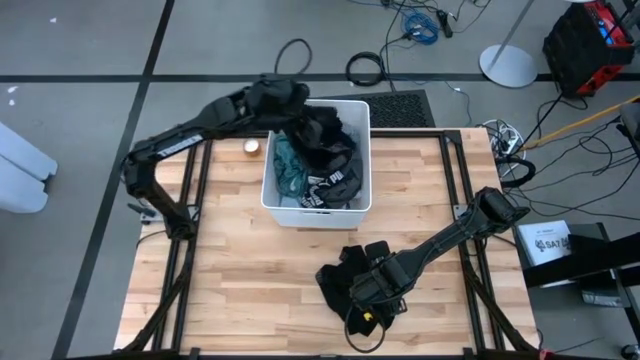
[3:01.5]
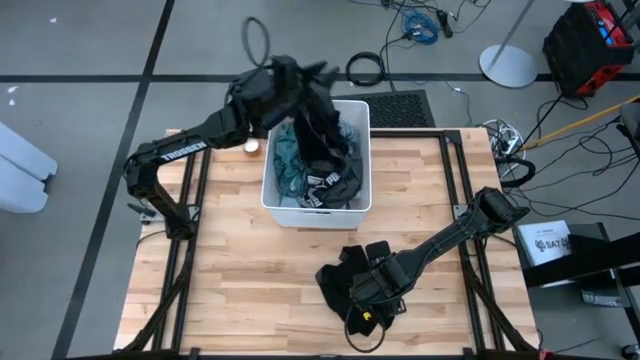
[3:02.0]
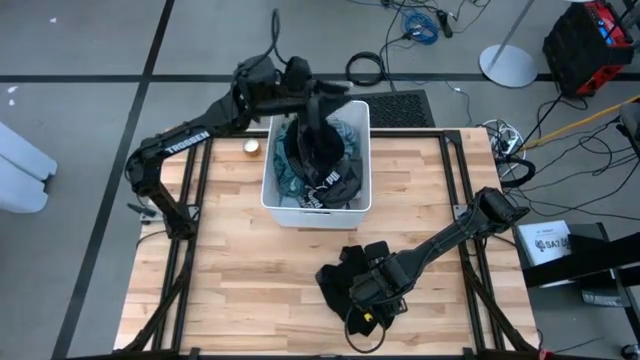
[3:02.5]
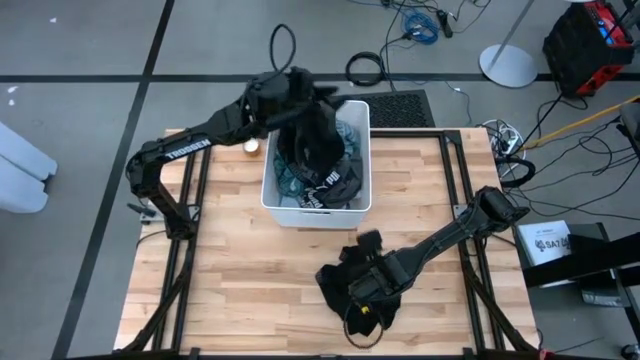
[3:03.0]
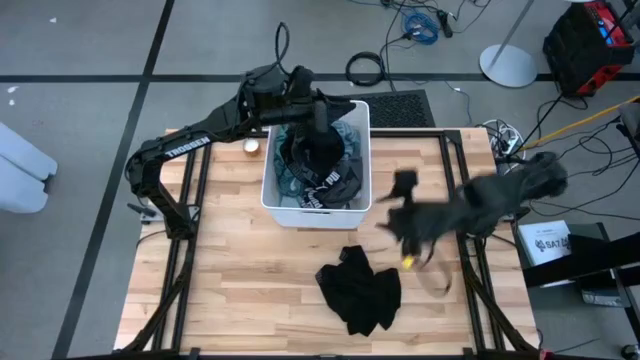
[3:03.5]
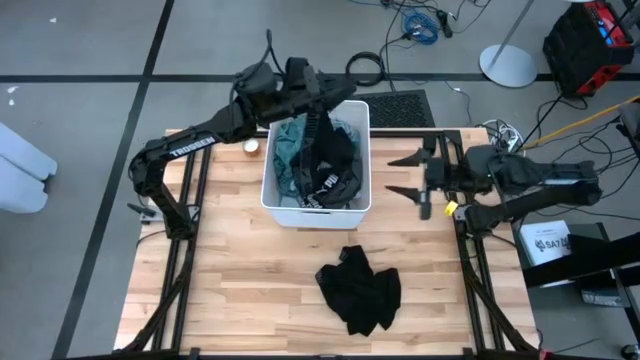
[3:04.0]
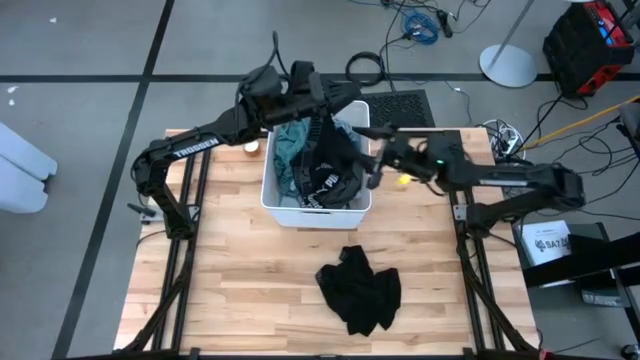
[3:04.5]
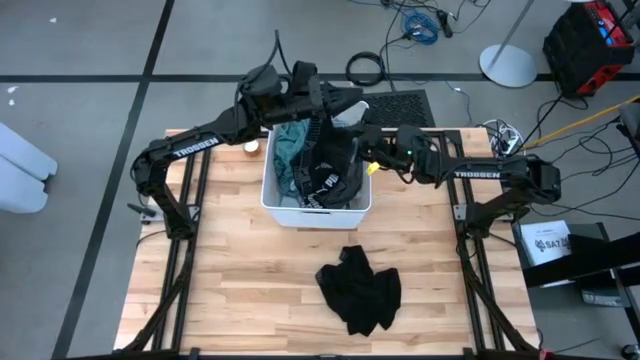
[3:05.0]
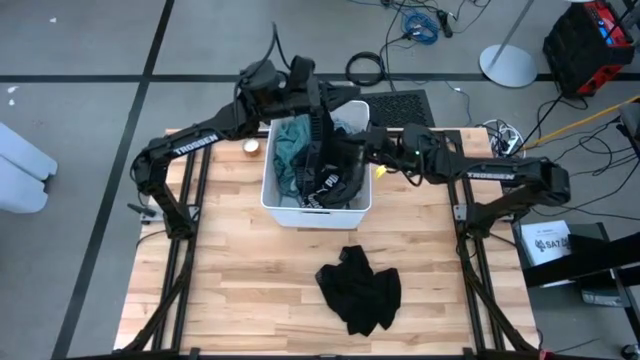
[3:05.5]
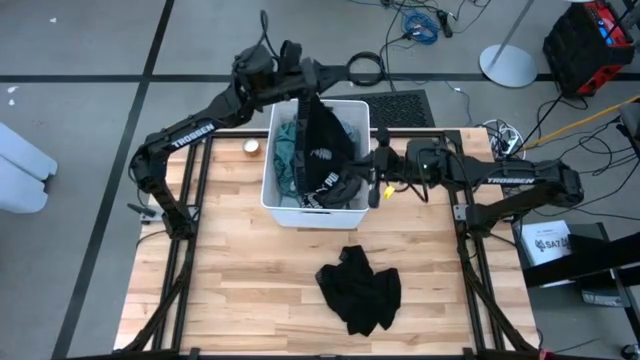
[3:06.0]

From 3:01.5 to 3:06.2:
Task: Sort clothes
Put the black boxer into the white laundry bin

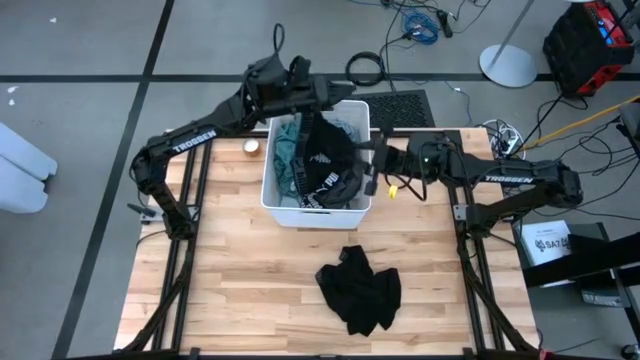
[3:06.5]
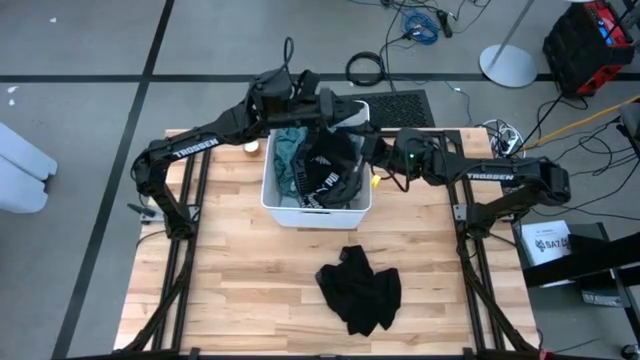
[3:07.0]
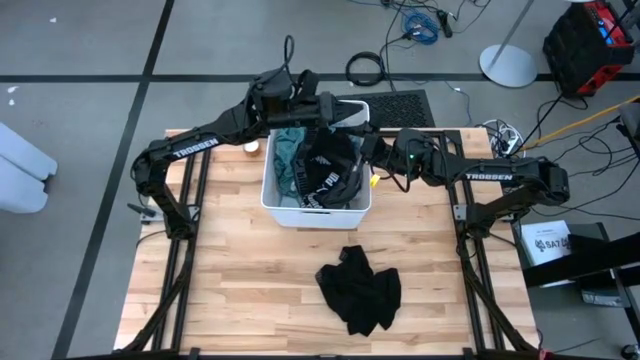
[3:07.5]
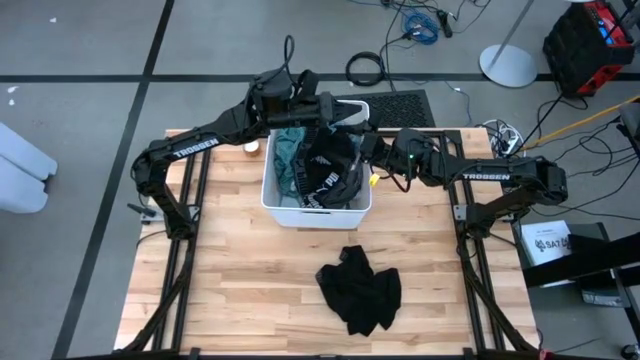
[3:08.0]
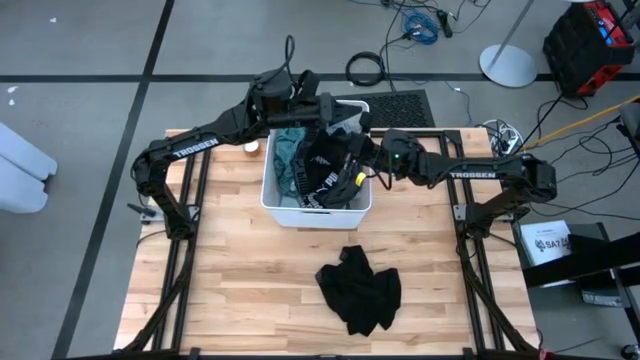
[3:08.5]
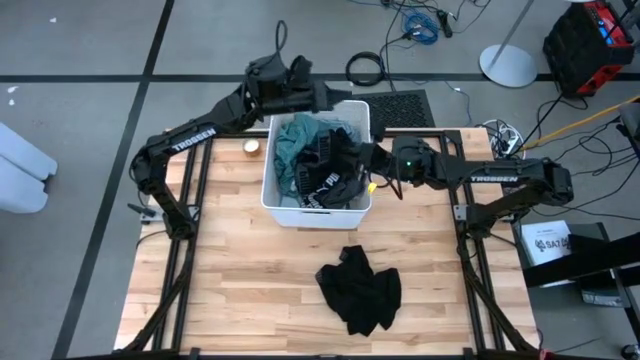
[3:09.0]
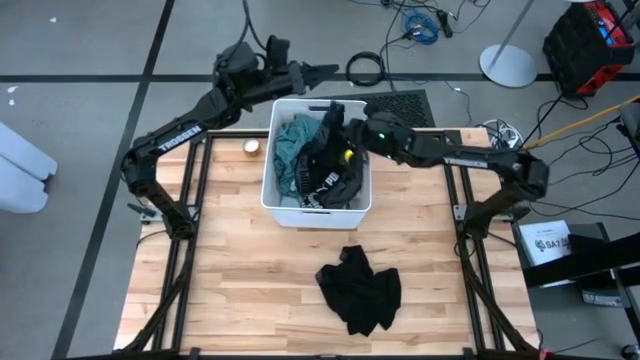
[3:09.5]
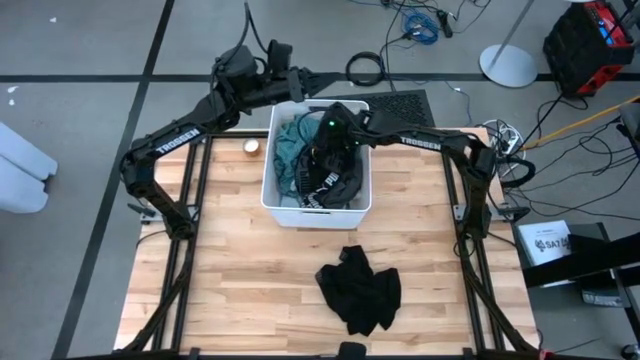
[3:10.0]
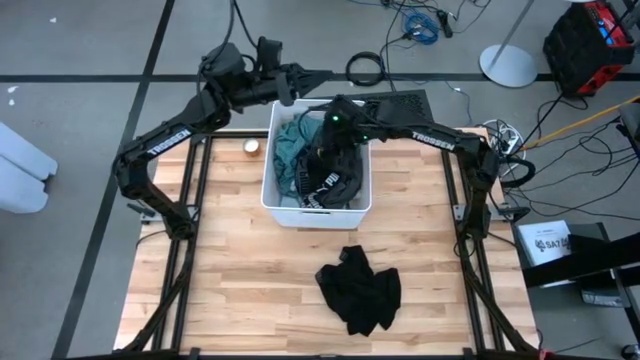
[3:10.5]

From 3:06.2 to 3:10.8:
Put the black boxer into the white laundry bin

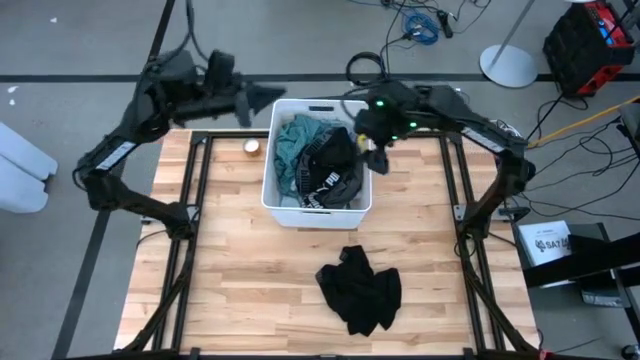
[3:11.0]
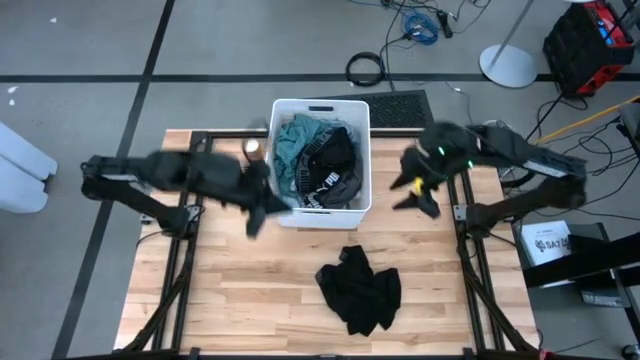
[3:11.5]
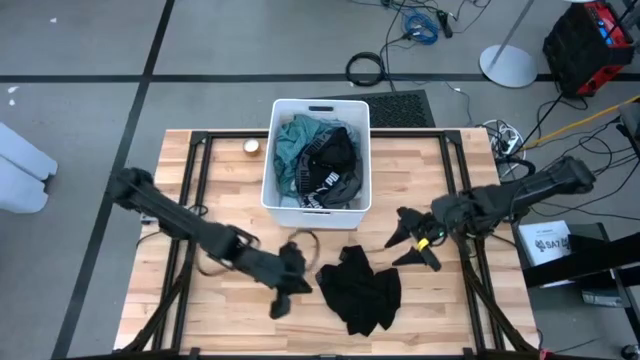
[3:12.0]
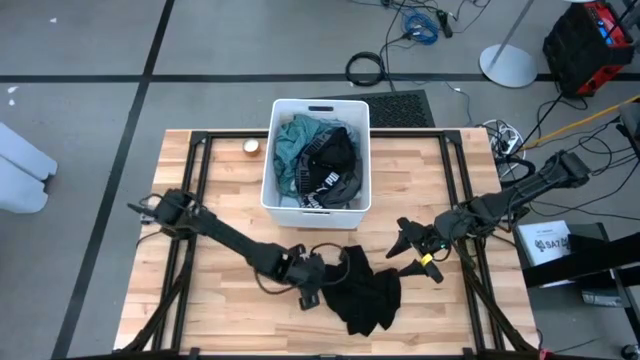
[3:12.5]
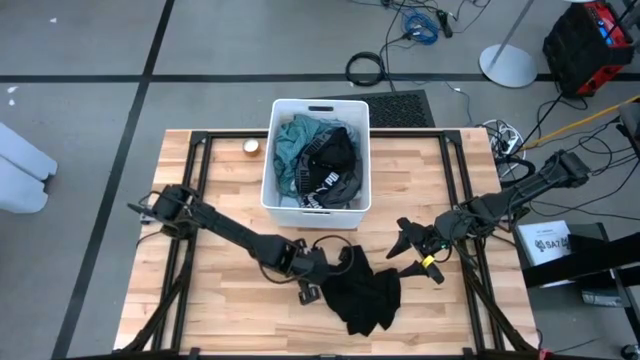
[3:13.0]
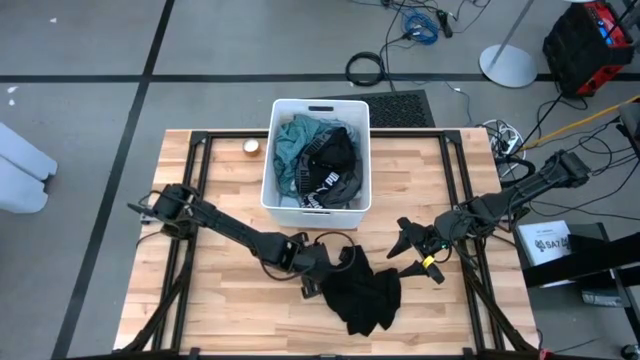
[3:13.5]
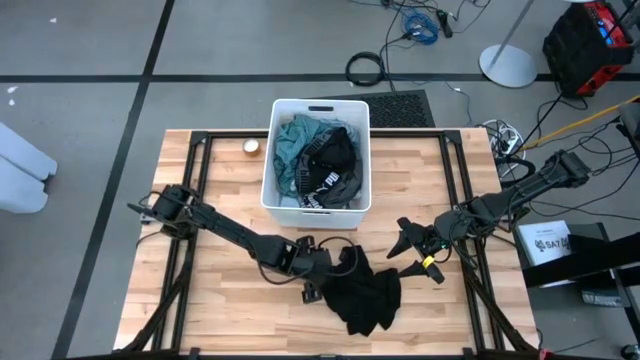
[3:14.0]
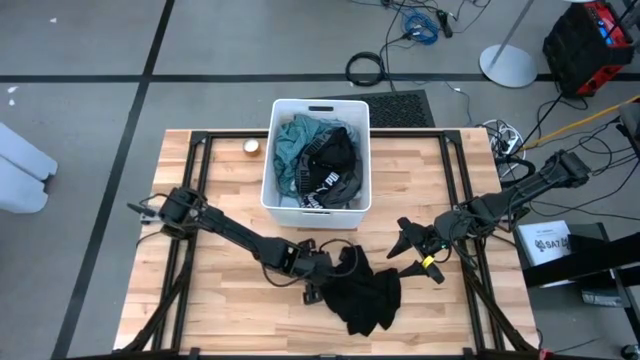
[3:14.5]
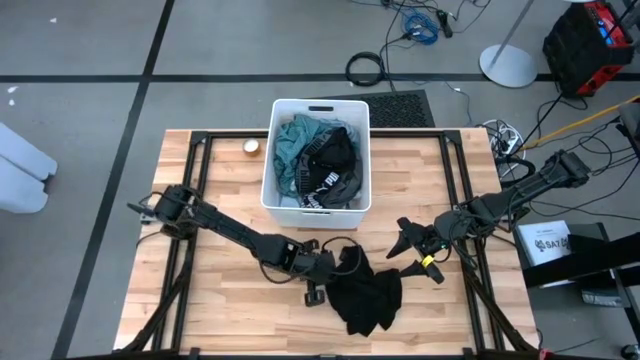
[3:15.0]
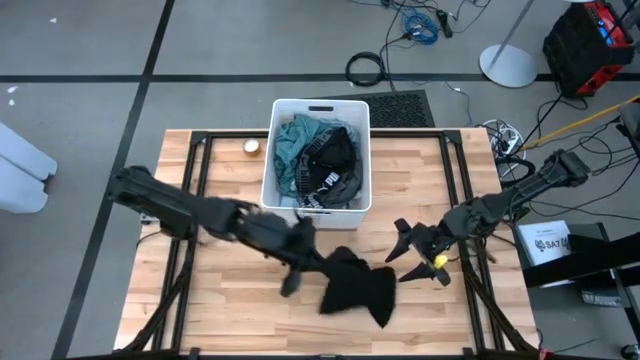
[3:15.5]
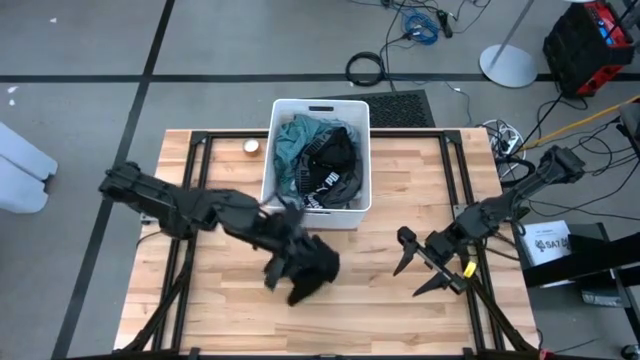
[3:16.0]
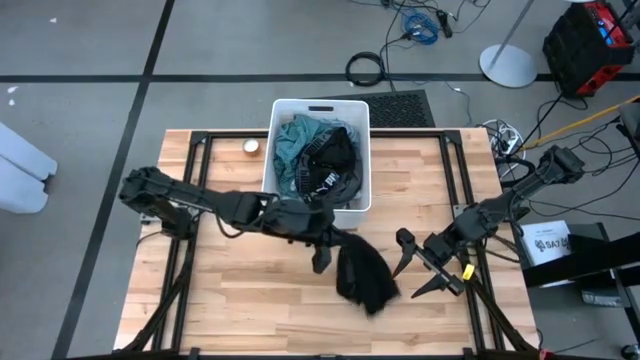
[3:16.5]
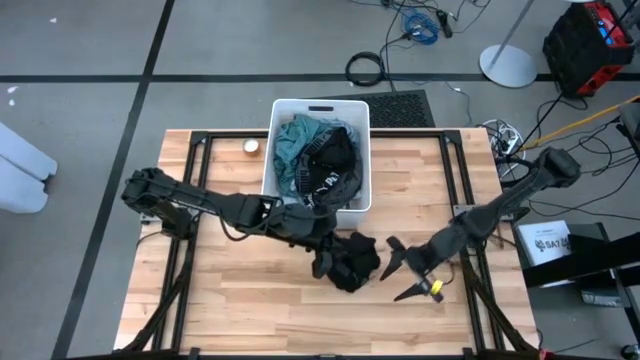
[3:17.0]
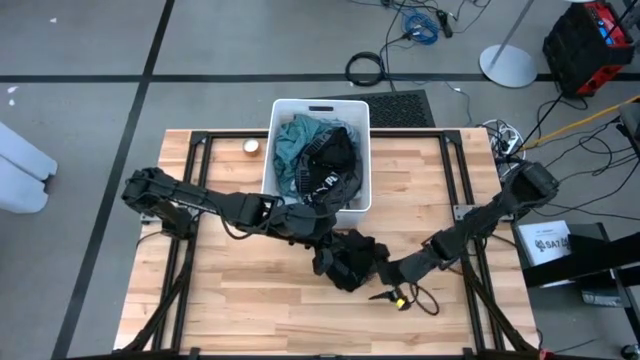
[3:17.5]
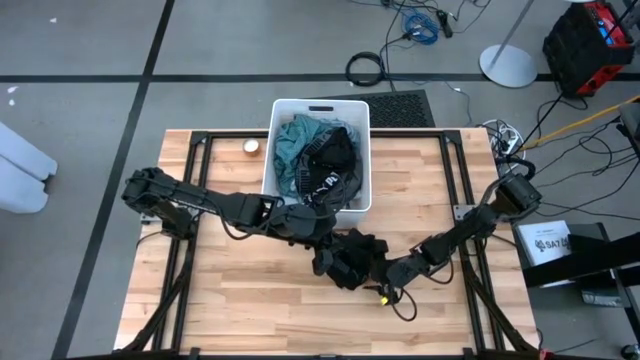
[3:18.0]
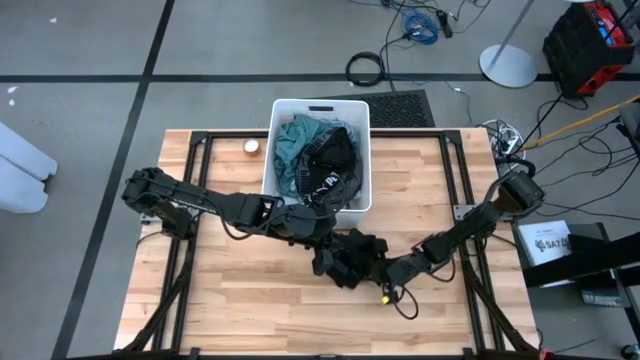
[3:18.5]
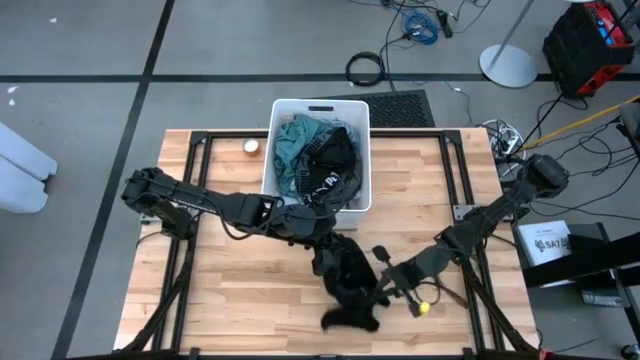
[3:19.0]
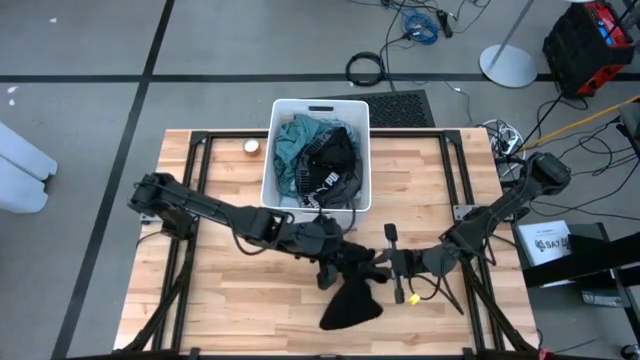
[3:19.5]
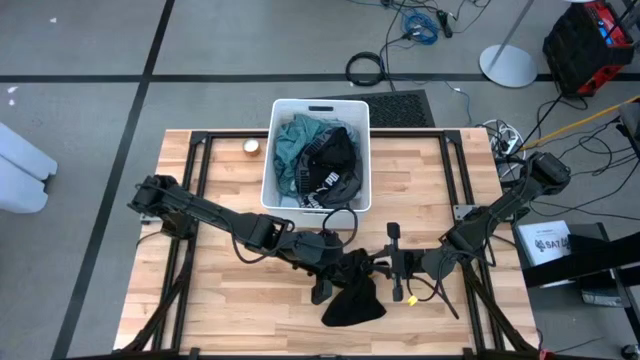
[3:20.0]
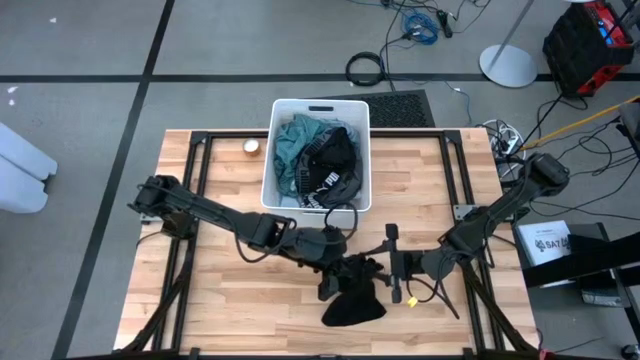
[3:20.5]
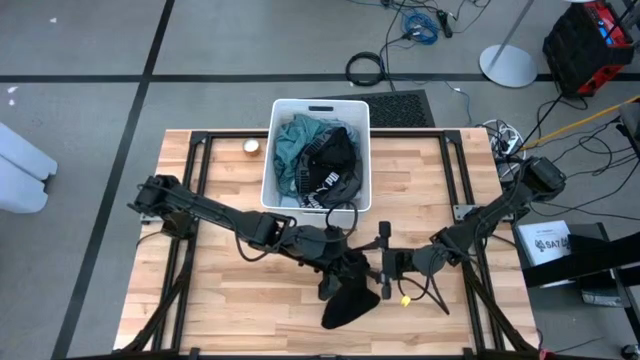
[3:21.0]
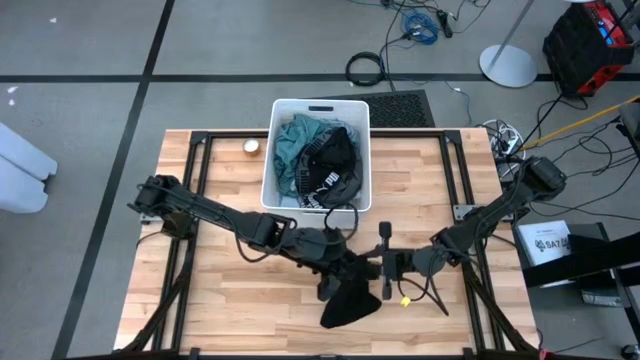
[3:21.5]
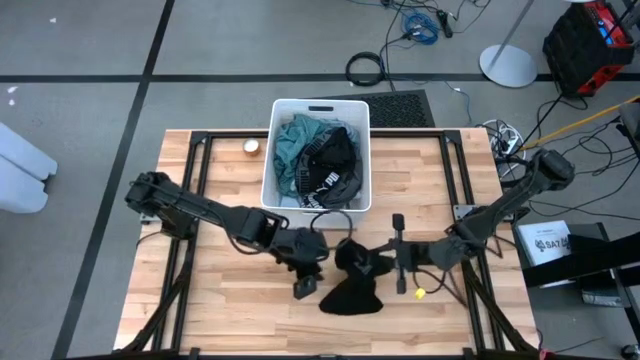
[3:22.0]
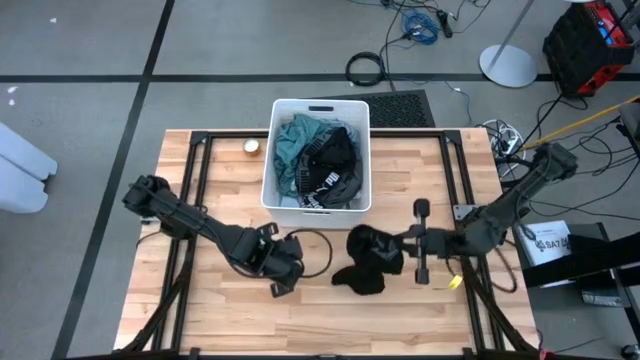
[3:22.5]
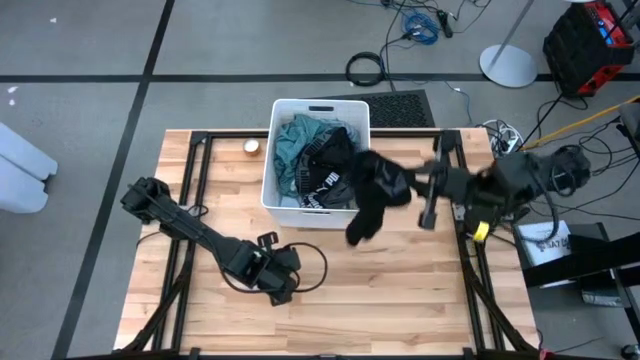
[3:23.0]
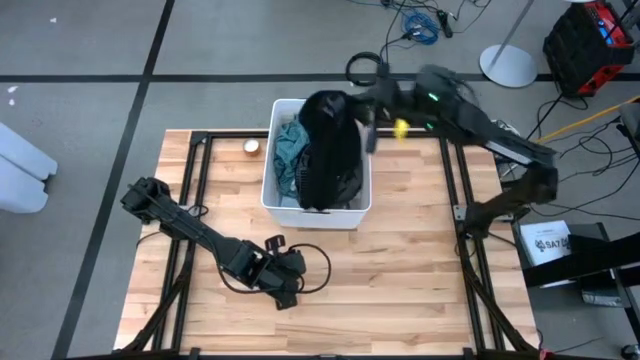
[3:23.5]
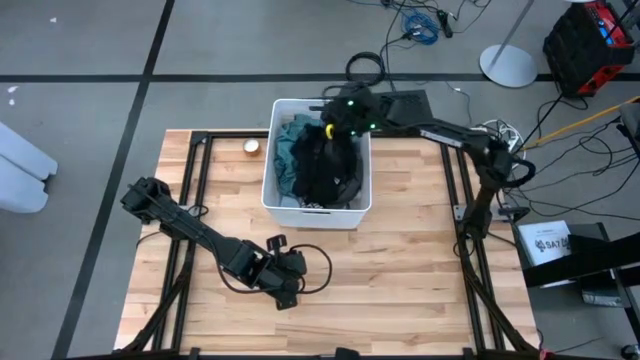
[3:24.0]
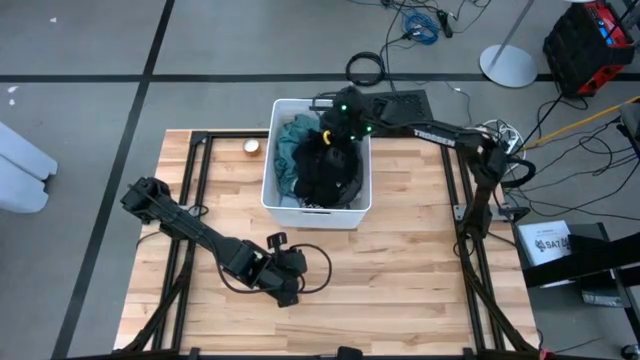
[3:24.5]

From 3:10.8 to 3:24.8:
Put the black boxer into the white laundry bin
